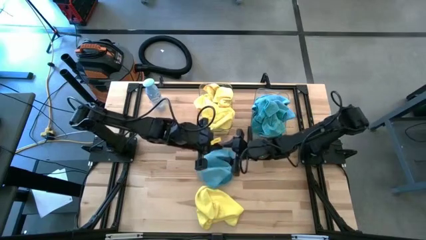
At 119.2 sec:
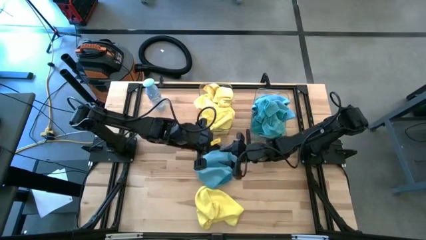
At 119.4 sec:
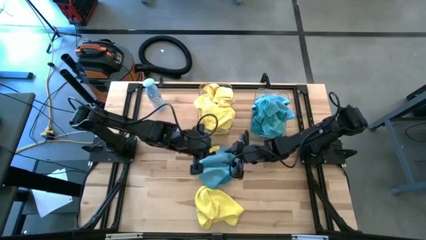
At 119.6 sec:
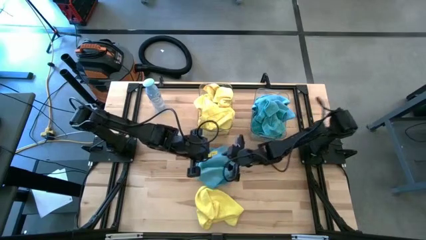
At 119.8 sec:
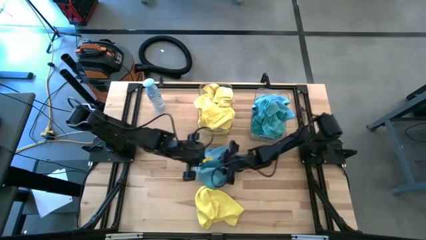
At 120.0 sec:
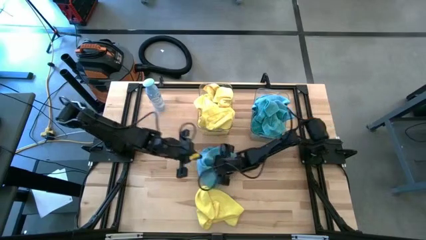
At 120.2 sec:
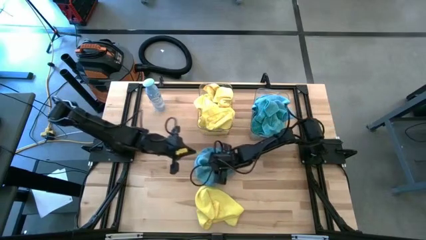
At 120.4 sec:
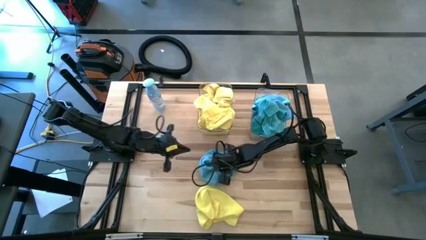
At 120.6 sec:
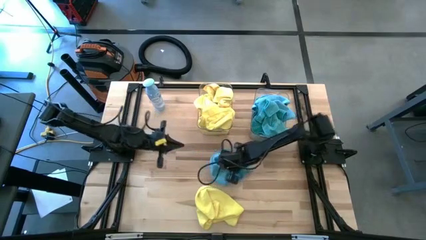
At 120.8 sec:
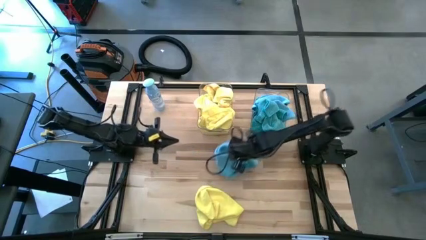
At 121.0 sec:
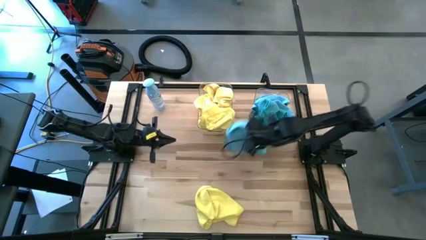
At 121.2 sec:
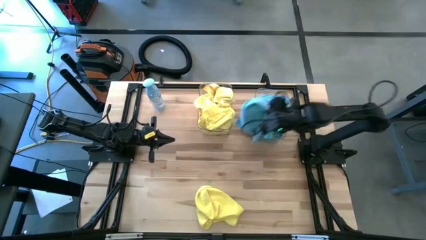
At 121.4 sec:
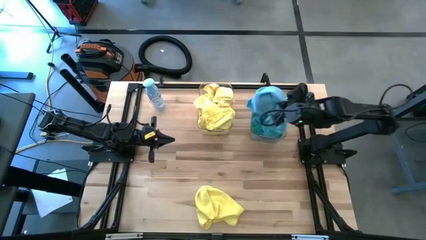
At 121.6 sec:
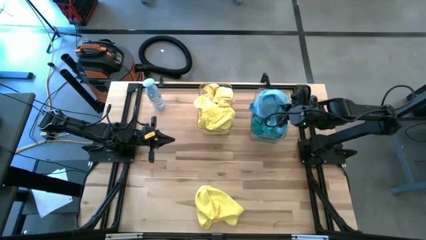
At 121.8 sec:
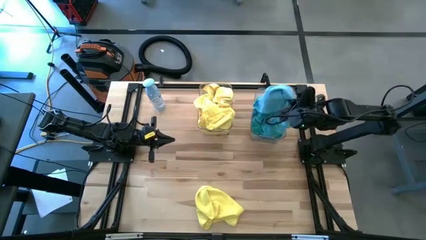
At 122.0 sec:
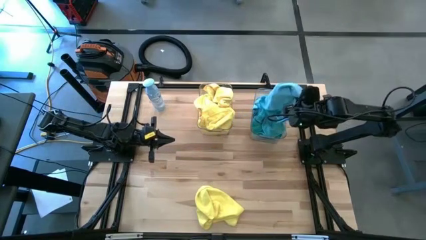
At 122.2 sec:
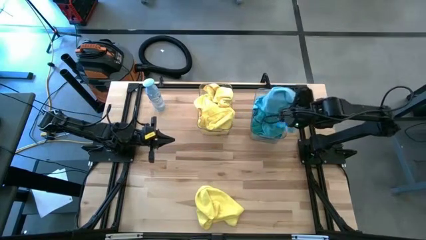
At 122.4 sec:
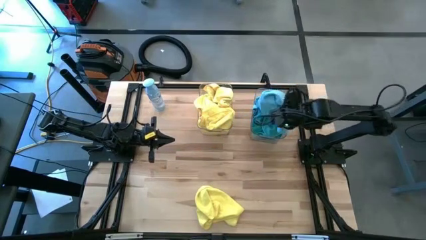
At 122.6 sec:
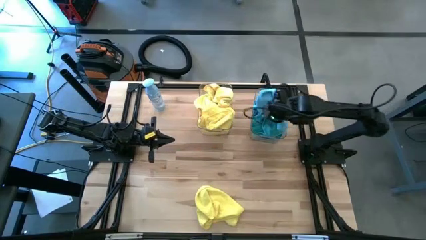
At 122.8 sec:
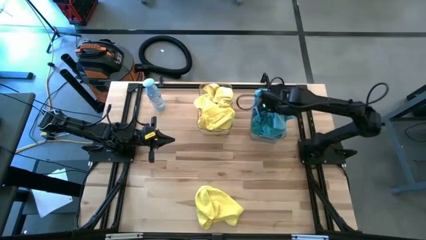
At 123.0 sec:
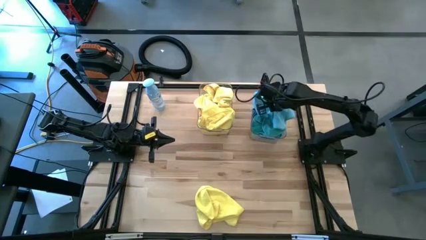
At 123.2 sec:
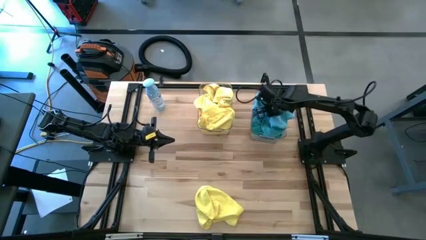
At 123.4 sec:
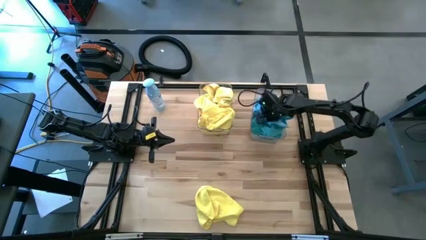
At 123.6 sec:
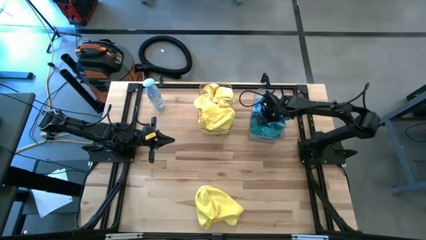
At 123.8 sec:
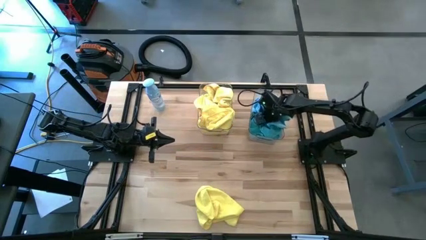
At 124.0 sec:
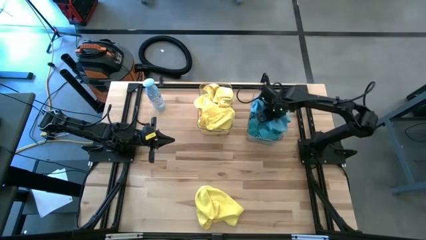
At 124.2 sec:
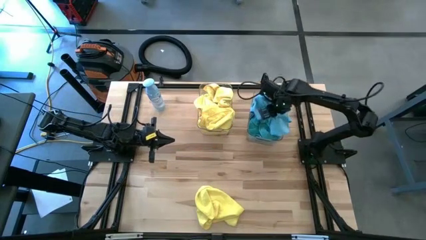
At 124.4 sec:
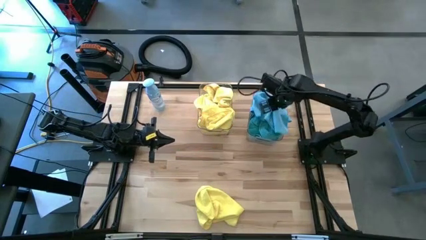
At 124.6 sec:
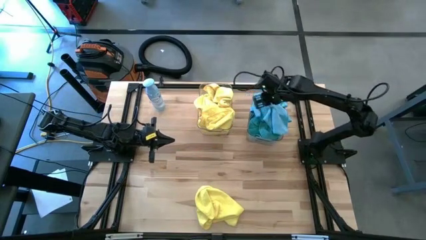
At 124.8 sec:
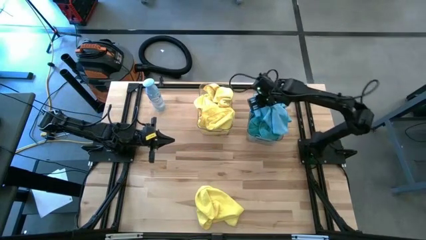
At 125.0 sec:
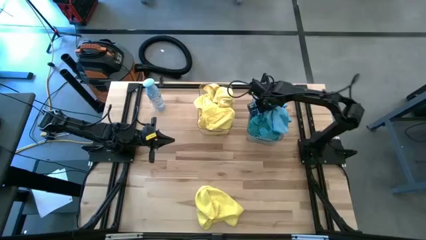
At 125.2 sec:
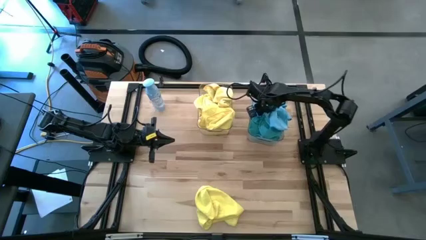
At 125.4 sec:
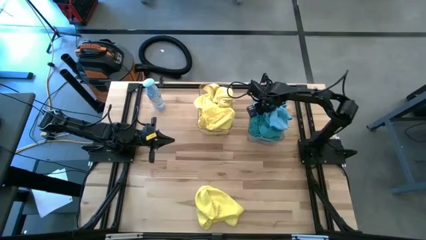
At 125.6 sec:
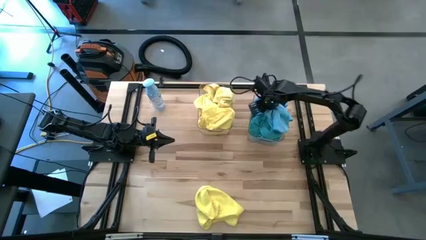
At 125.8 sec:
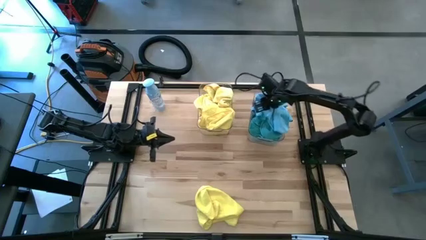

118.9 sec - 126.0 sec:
Task: Sort microfiber towel by color & place in baskets
Put the blue towel into the right transparent bin

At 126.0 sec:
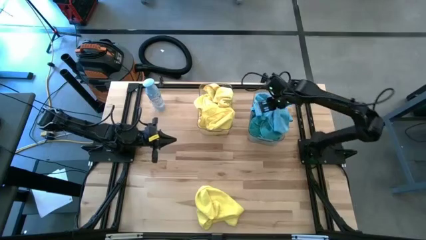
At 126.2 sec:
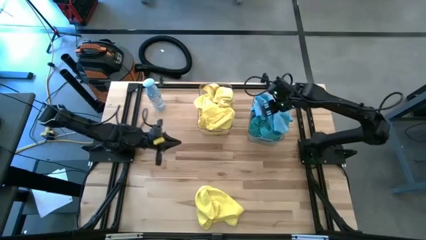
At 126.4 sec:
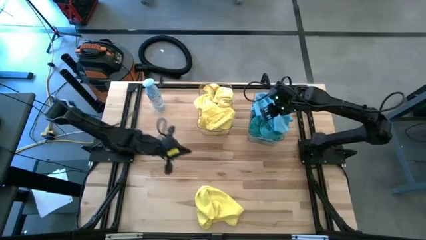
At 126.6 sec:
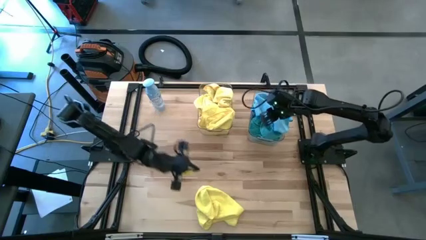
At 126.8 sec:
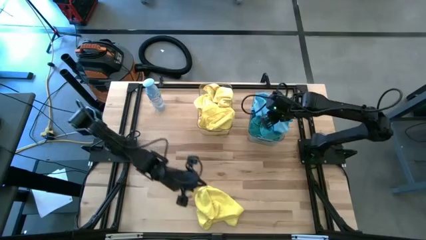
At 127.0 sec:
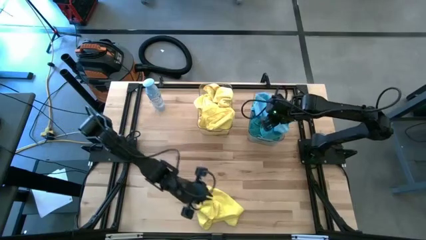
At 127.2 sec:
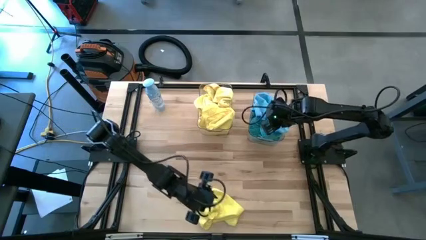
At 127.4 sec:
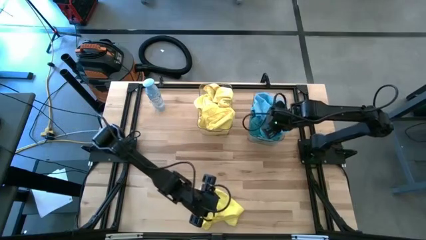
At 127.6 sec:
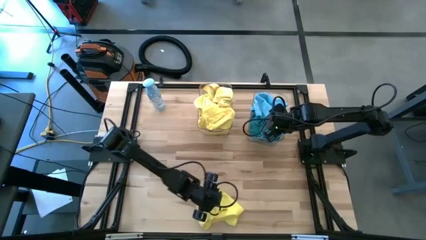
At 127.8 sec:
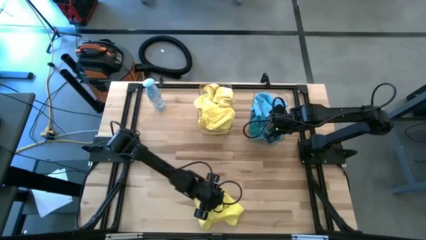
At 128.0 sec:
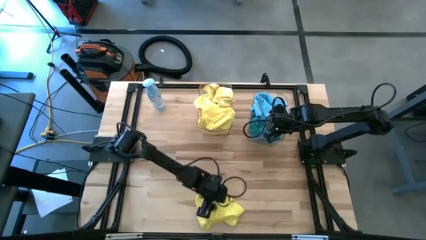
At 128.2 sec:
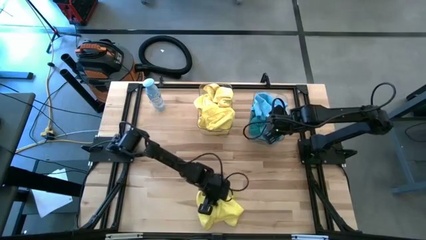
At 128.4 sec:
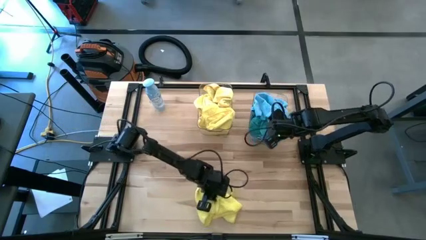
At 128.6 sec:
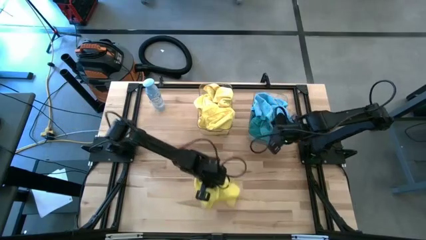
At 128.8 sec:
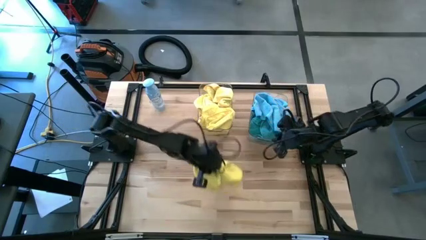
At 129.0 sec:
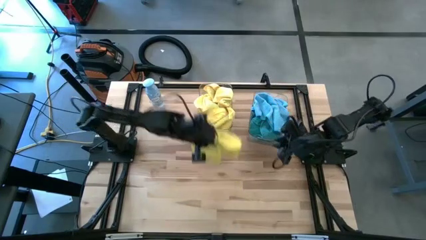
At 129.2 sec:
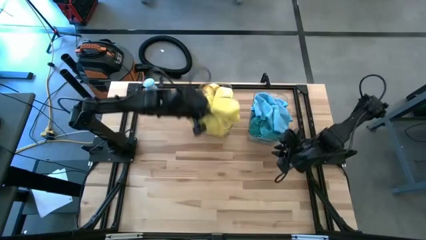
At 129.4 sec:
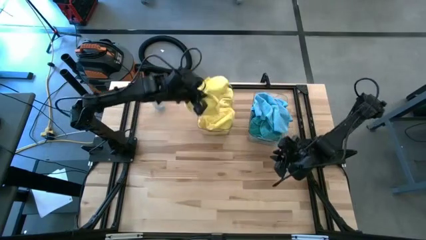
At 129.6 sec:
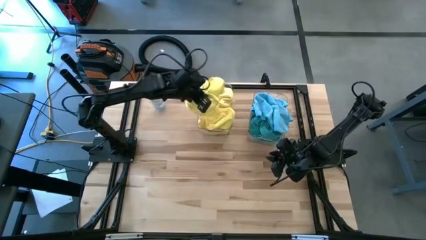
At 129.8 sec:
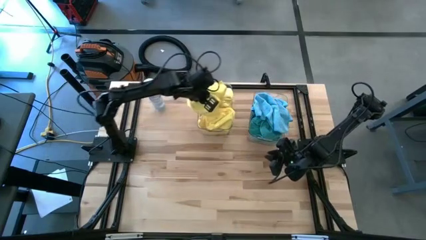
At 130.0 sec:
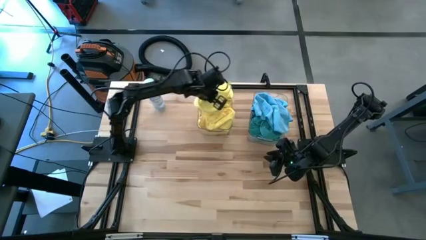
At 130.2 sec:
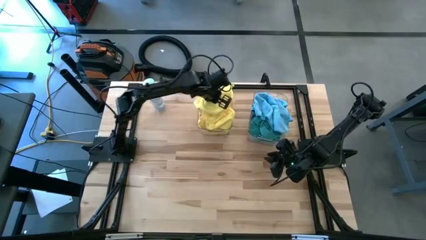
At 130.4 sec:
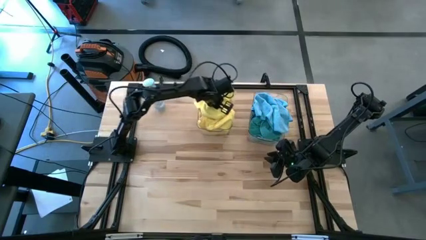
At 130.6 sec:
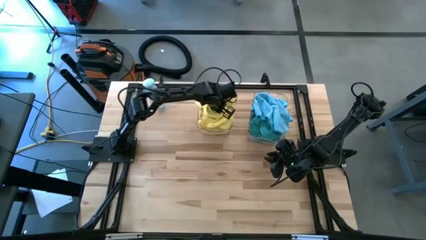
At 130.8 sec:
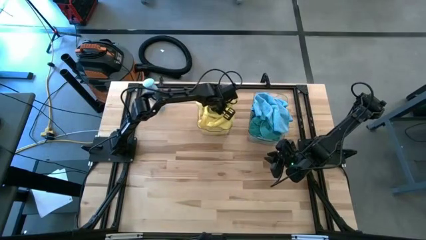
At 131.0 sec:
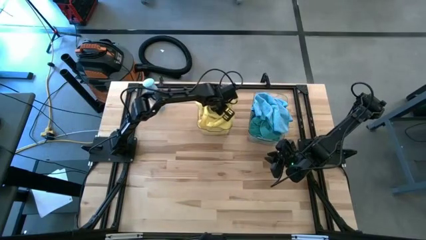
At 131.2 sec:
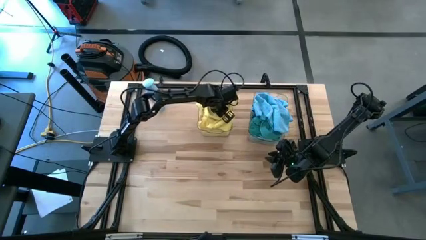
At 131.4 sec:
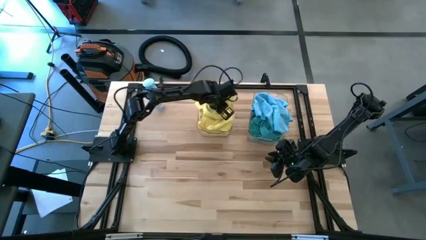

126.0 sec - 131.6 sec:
Put the yellow towel into the left transparent bin

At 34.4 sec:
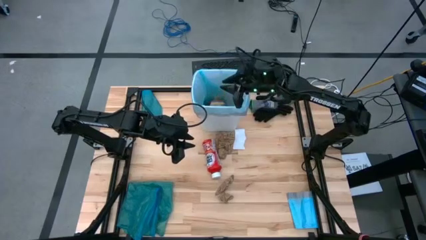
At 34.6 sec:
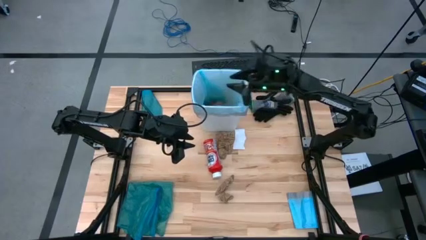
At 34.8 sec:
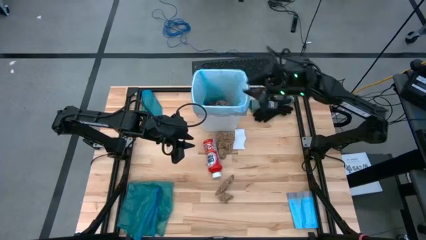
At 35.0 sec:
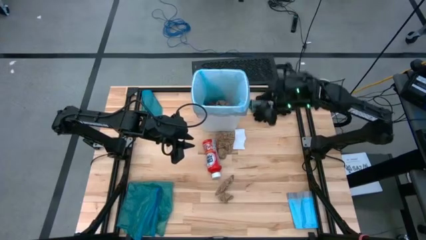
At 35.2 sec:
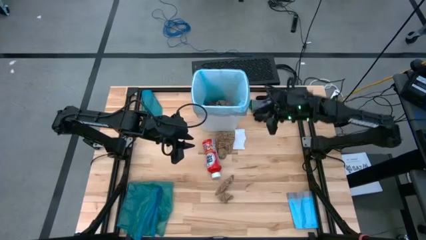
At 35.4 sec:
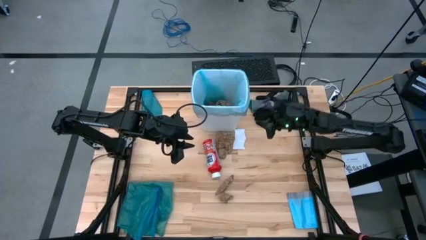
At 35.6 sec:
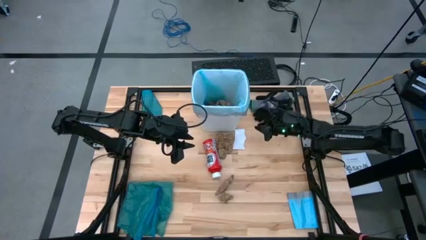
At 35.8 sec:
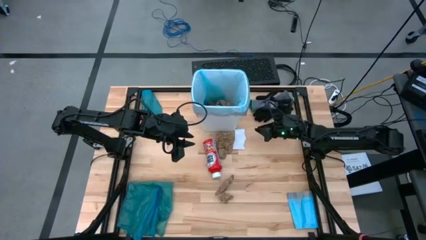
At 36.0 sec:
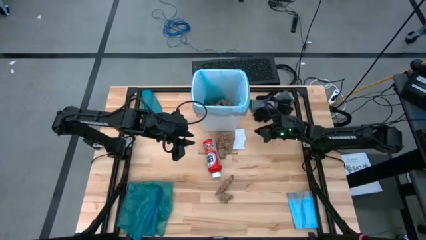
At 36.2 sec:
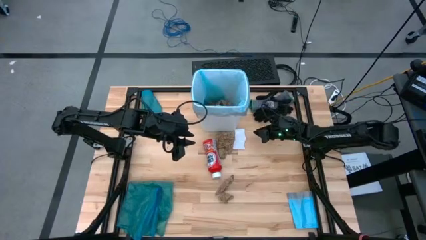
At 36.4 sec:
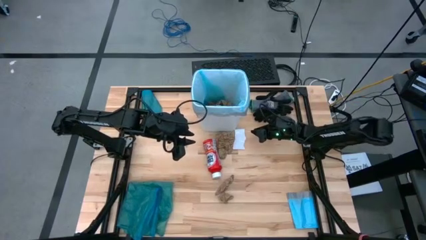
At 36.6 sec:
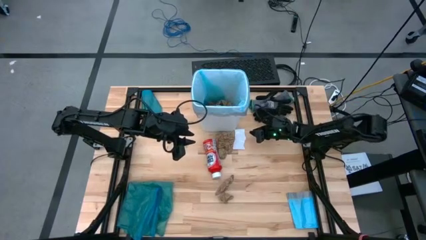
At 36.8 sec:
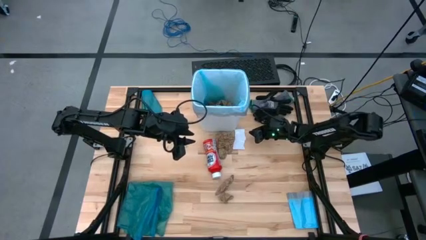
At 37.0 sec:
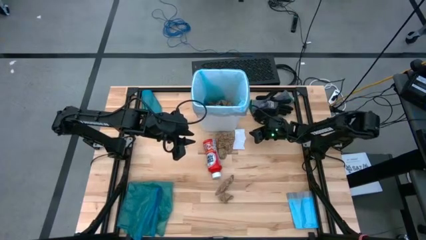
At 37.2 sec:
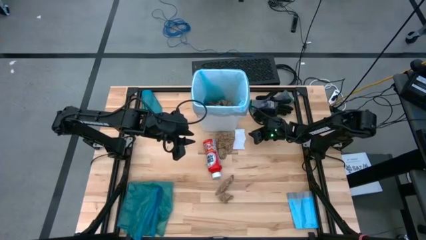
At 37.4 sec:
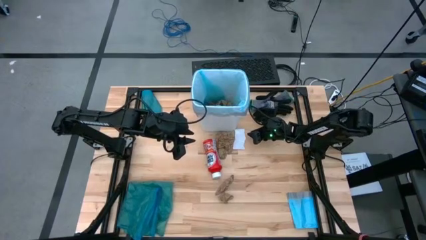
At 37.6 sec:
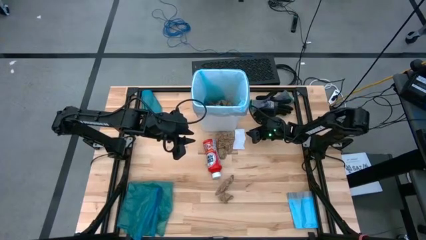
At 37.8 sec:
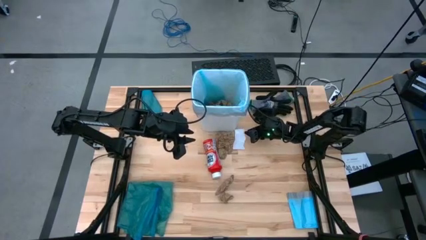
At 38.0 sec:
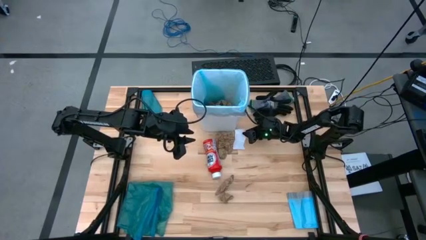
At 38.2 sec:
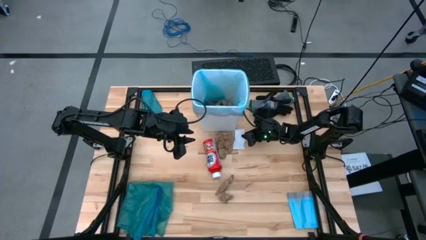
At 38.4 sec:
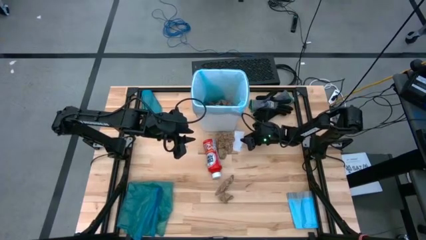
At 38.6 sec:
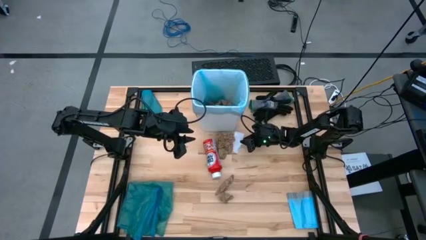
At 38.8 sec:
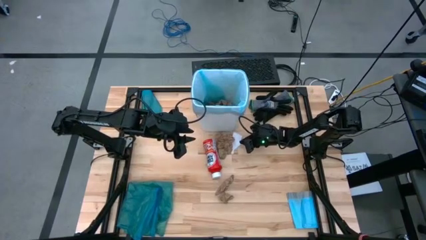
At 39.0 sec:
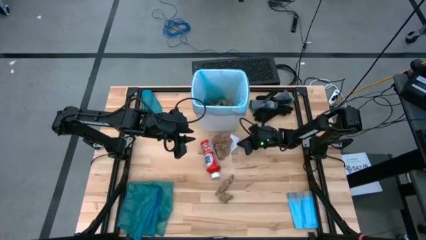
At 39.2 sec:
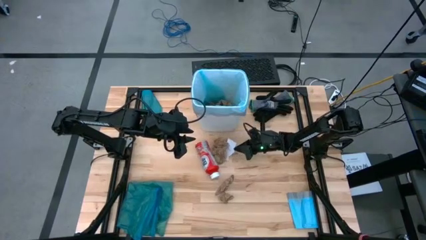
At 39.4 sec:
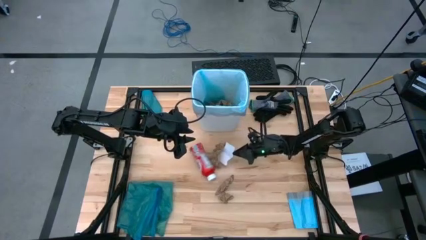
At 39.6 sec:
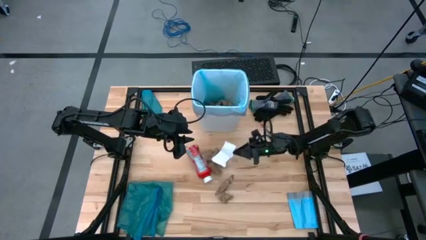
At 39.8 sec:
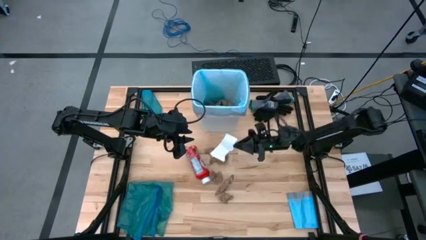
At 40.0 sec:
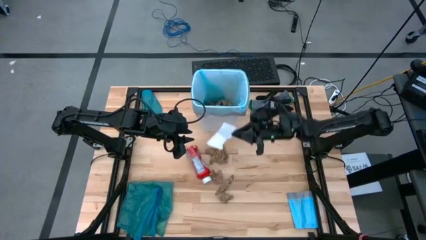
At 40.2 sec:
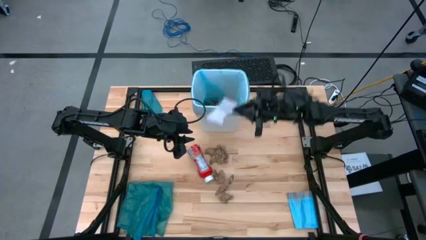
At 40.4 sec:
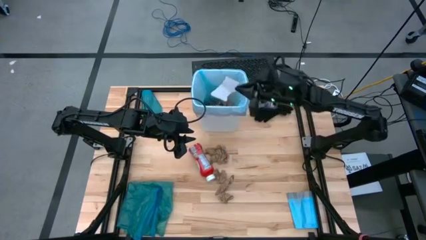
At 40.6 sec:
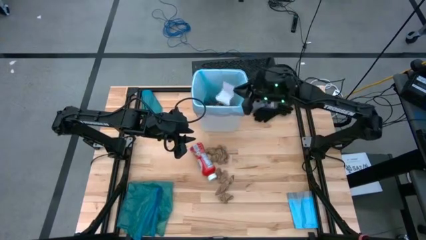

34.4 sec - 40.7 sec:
Task: place trash/remove bag and relplace
Put the white paper into the white trash bin
